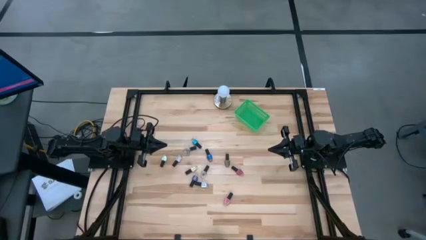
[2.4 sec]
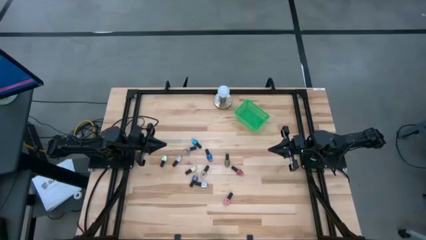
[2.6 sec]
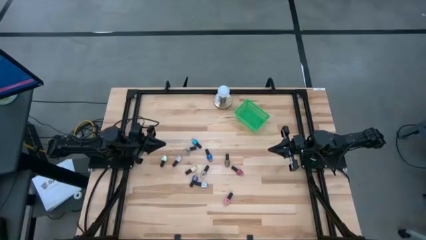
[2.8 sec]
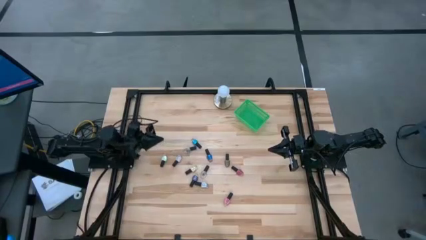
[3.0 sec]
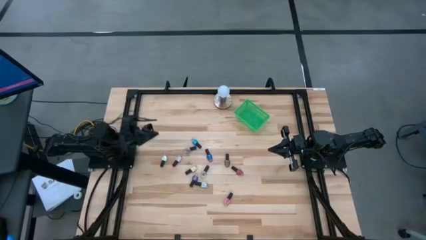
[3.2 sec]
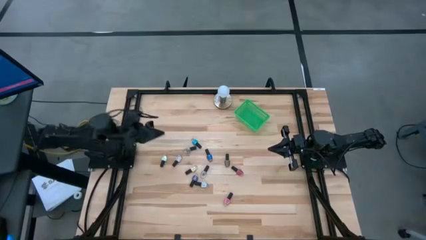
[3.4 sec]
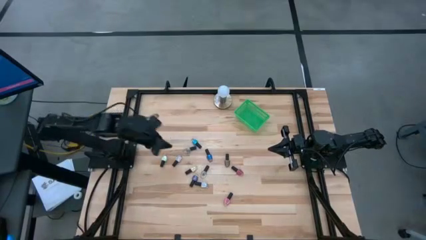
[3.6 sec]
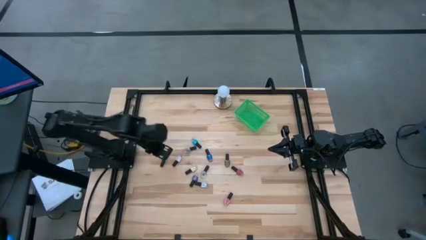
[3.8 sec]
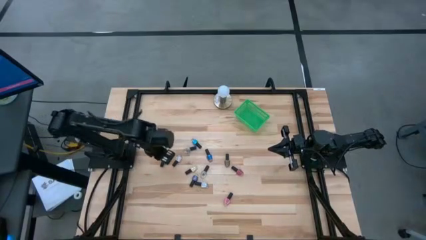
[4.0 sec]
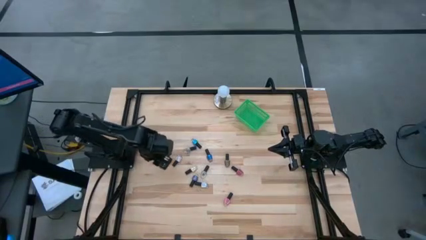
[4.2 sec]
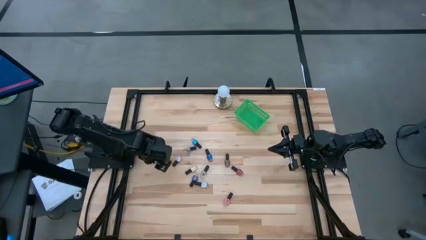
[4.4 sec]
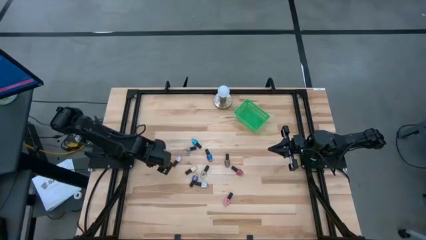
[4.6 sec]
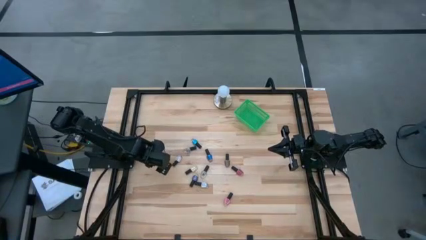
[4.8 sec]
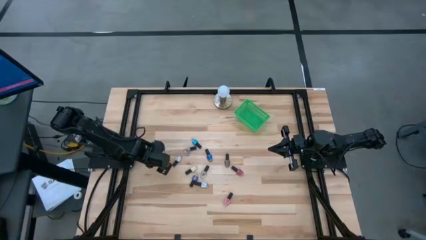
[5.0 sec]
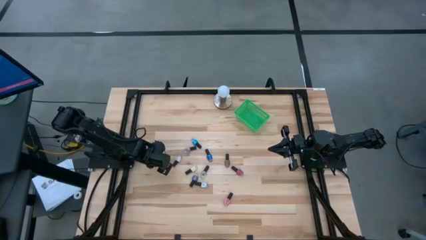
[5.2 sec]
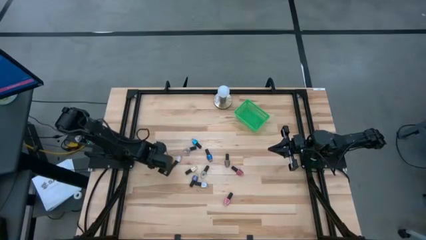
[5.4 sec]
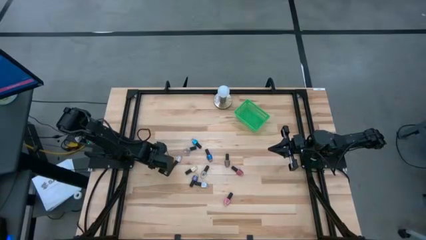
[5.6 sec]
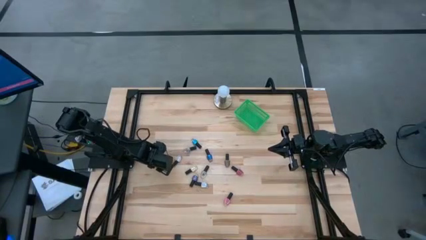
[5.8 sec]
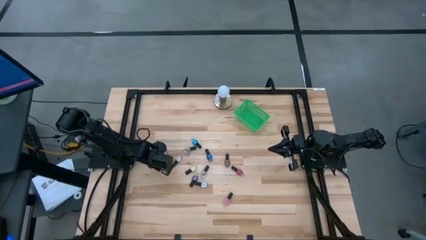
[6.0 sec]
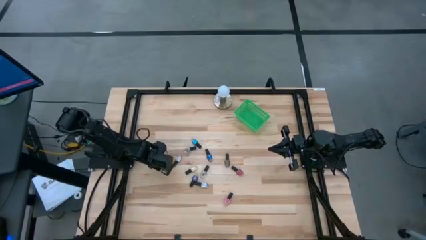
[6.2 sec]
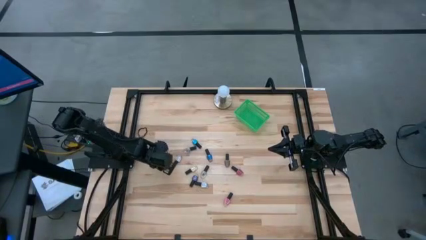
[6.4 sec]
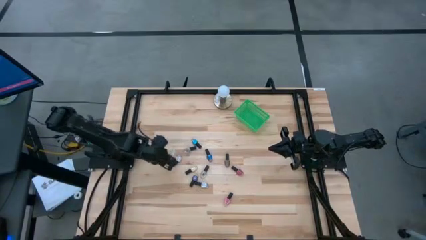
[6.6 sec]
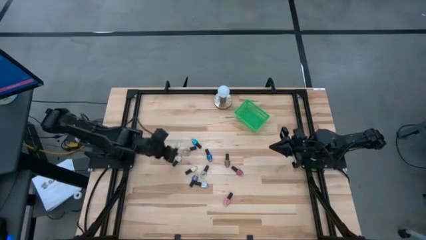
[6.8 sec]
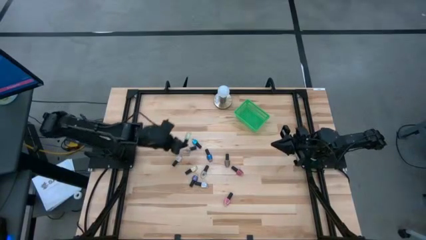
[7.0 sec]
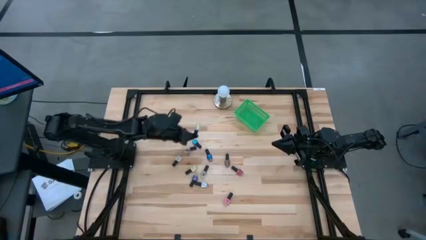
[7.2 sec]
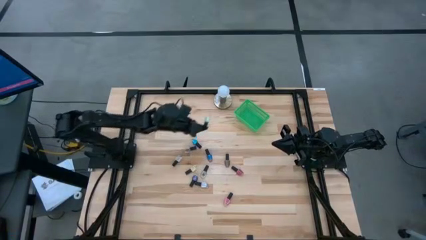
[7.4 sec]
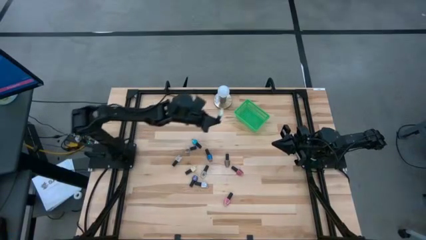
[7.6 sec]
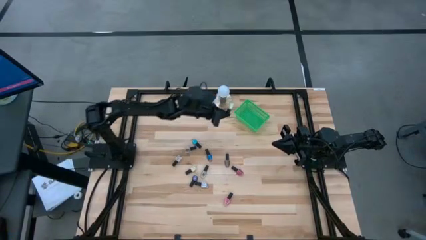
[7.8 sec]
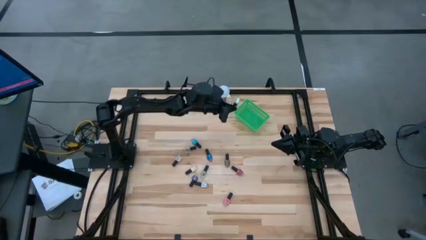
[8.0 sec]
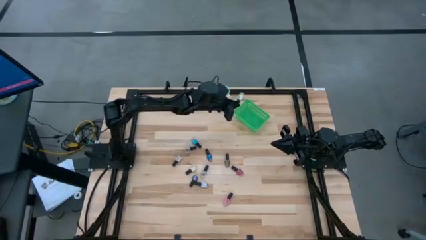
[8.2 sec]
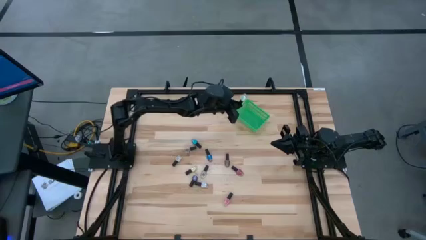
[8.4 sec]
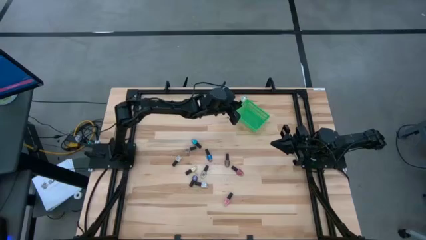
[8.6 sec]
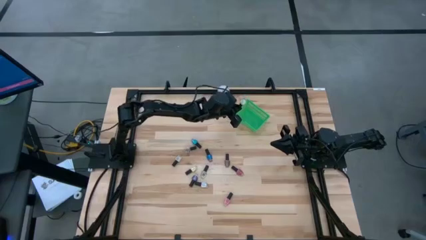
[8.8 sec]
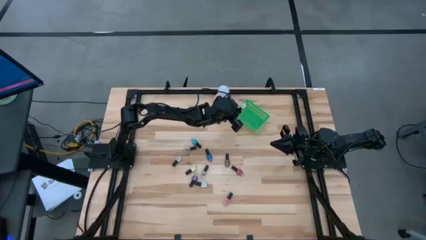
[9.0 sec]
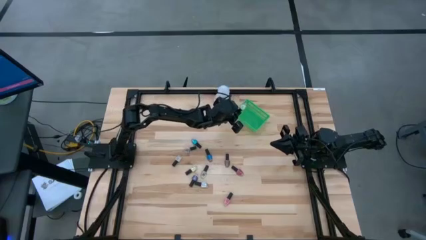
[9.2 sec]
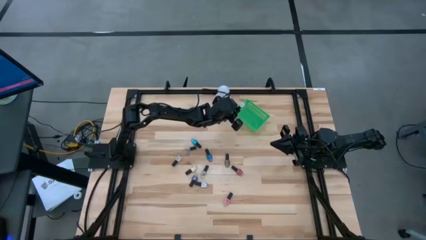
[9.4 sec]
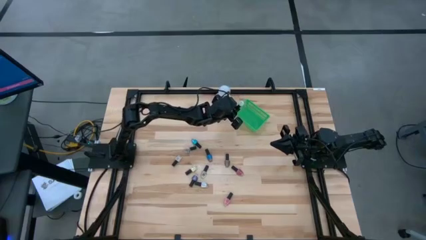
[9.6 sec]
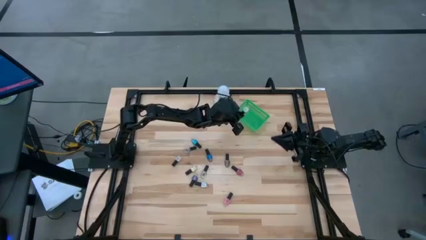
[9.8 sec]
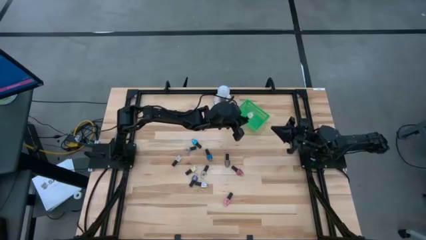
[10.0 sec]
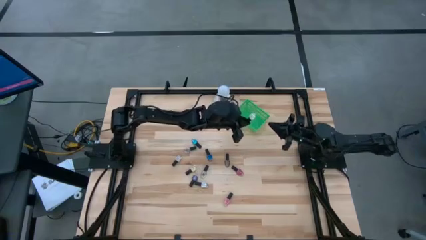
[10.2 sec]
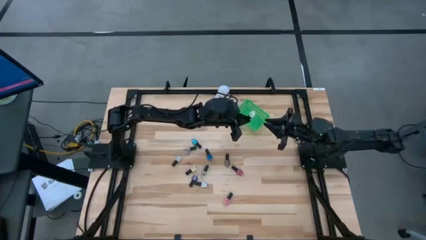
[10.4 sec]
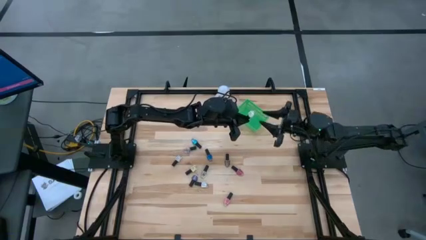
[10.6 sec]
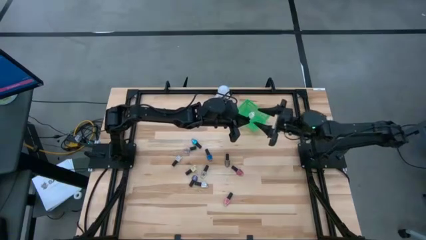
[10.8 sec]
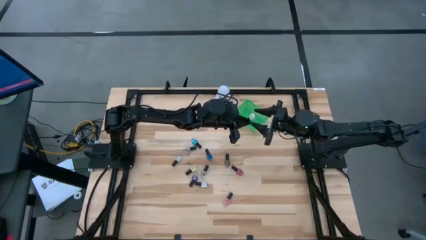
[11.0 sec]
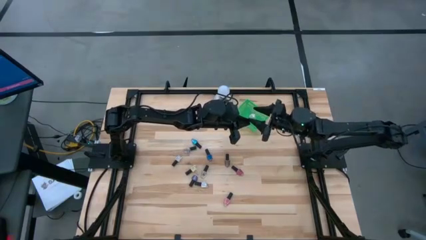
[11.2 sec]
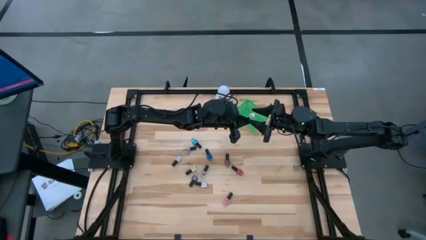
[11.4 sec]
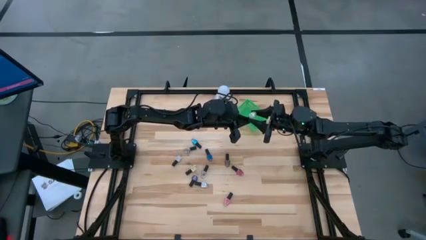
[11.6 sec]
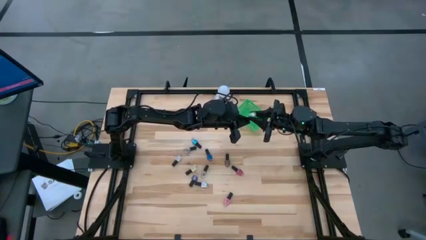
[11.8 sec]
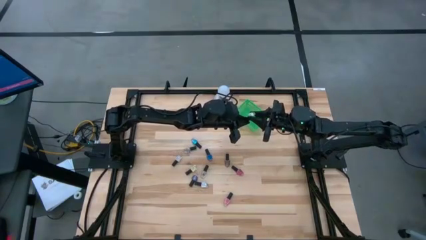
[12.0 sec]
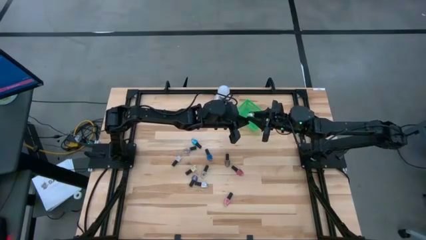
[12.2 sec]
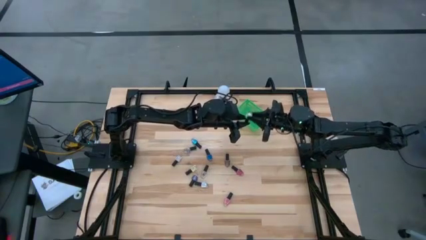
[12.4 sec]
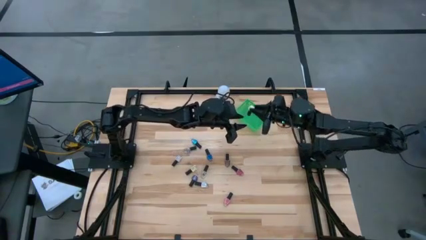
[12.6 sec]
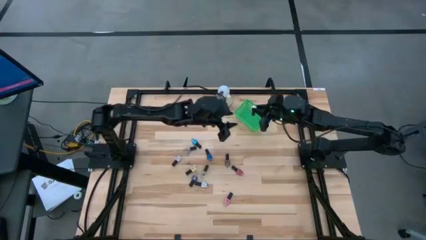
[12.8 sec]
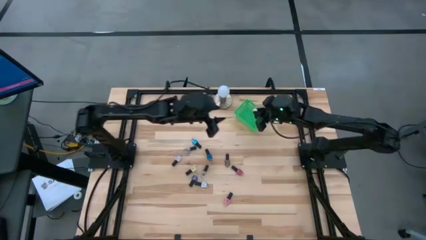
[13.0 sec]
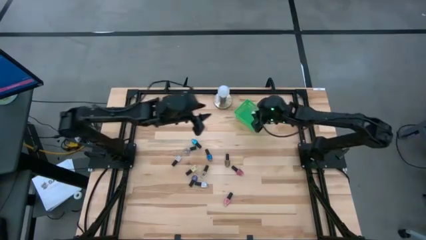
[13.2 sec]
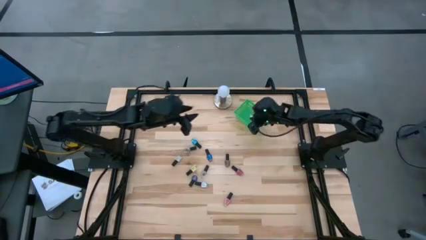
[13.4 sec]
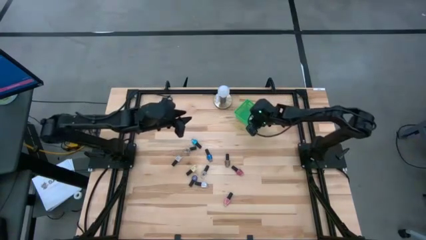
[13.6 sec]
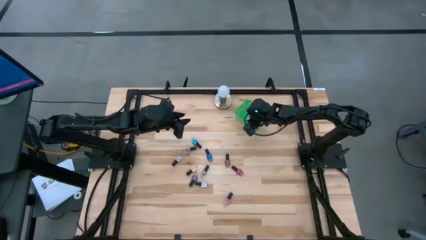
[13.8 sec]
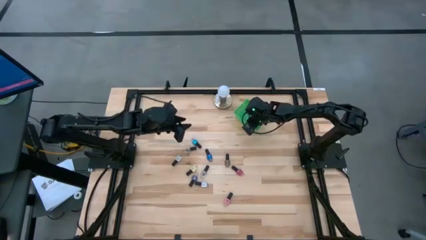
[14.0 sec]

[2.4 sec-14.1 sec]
Task: Pick & Place Nail Polish
Put the light green nail polish bottle into the green bin

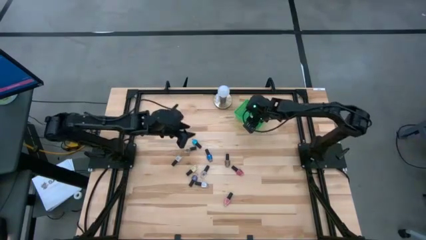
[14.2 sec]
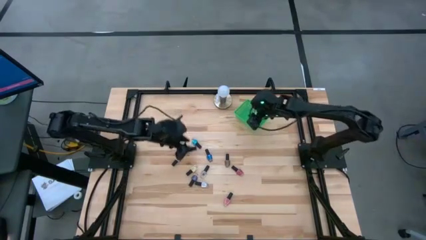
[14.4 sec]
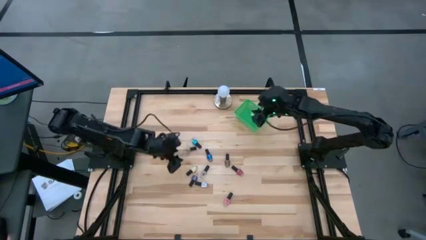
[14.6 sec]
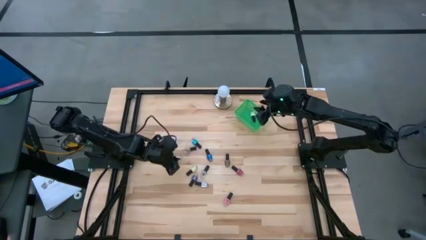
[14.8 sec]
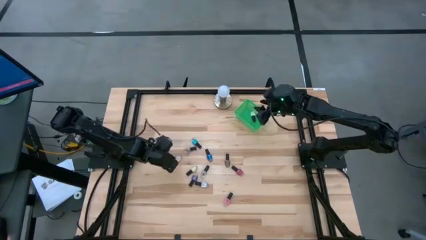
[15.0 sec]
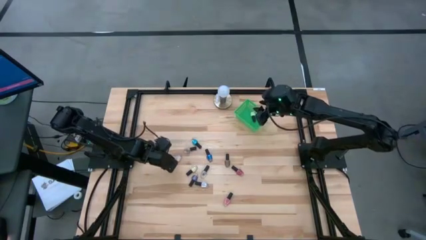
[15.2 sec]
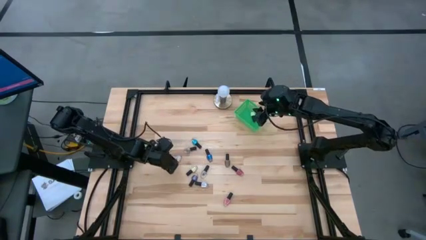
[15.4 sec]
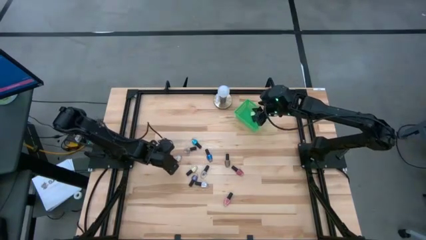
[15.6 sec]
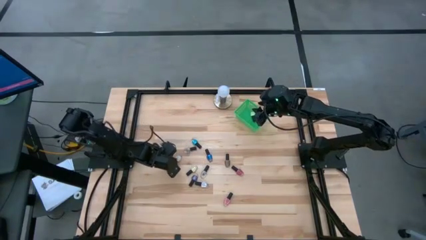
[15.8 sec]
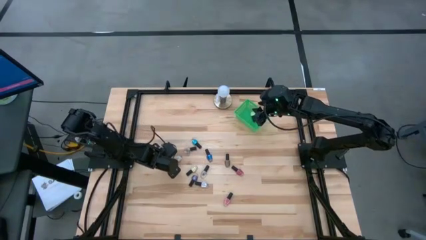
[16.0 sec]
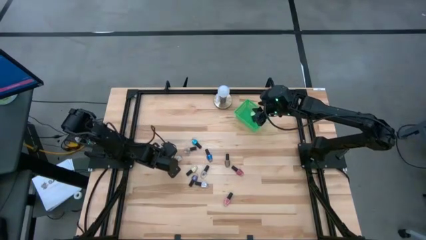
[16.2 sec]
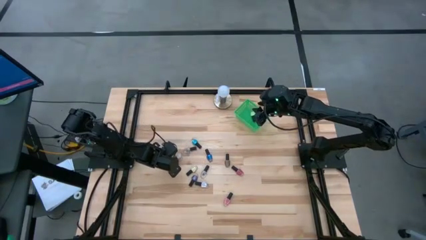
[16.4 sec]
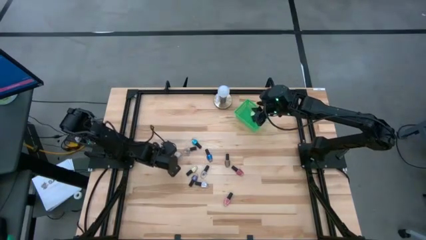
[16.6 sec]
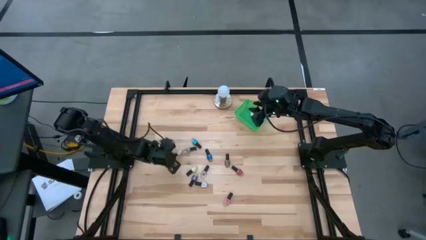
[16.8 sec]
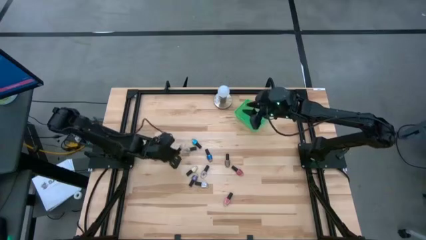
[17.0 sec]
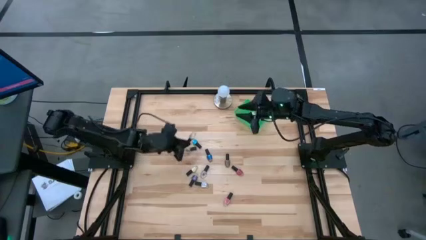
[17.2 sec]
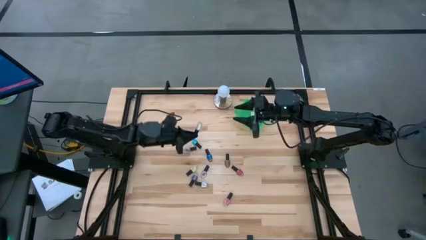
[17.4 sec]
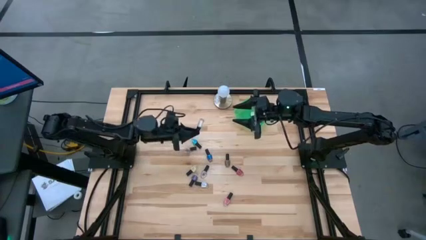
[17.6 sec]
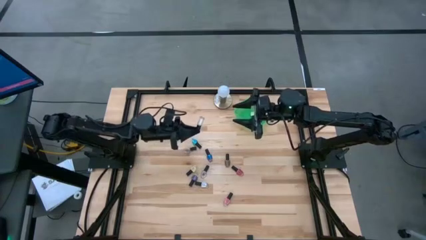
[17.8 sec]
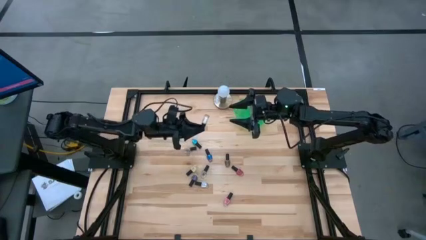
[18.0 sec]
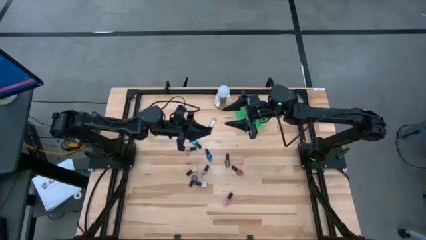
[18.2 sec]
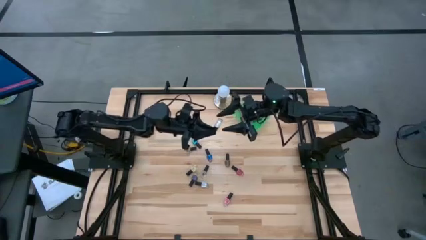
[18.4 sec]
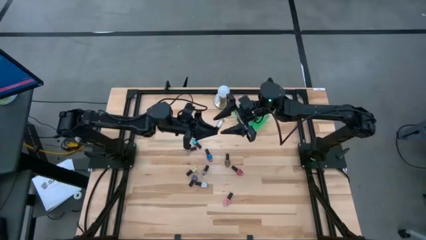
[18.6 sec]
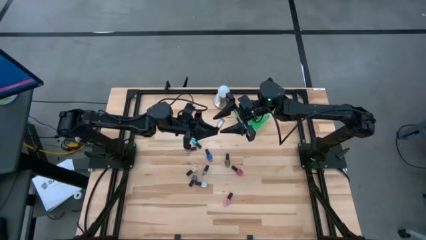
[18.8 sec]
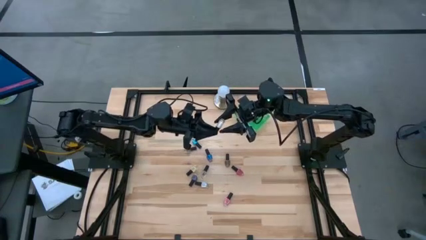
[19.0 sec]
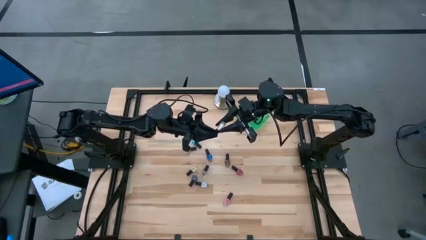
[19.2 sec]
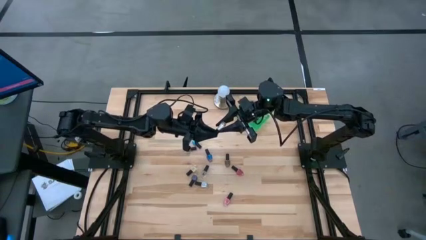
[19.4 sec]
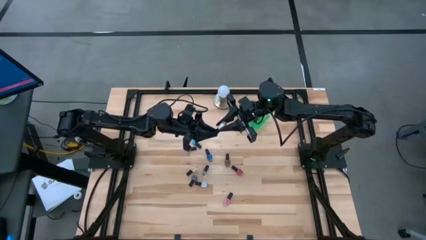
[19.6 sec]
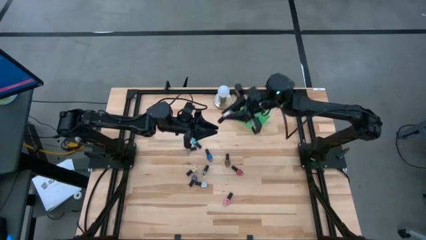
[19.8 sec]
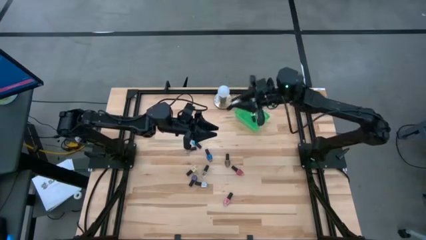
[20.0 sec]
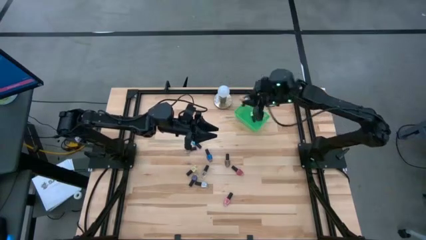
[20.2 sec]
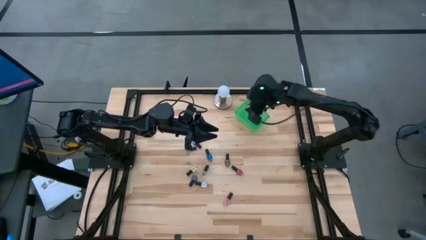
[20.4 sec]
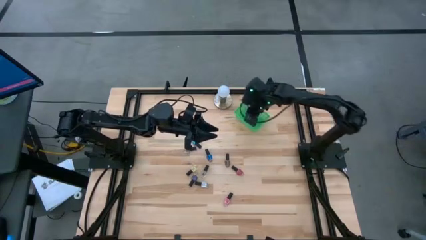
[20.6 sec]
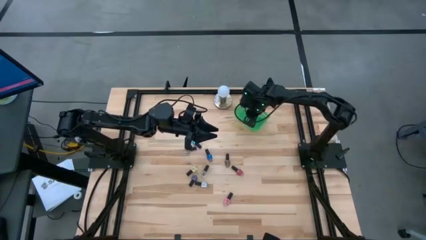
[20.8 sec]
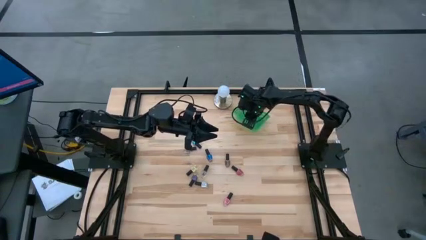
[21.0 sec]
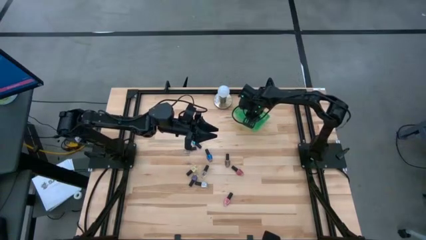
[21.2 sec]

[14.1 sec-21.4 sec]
Put the top white nail polish bottle into the green bin
